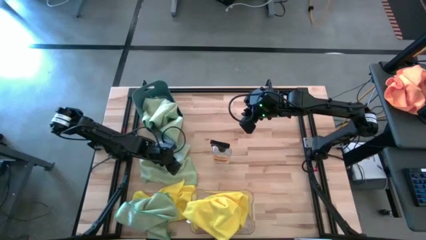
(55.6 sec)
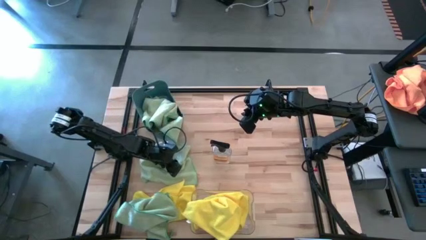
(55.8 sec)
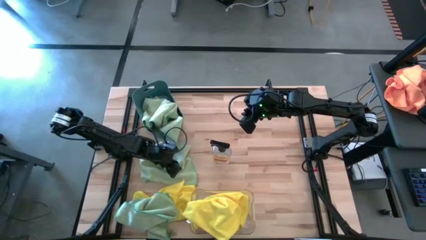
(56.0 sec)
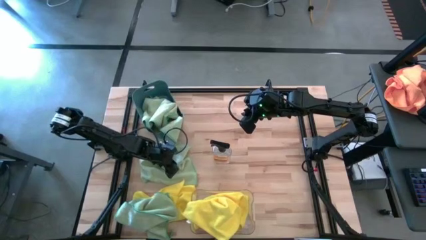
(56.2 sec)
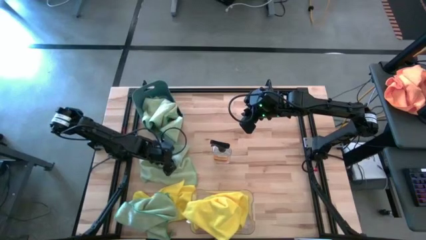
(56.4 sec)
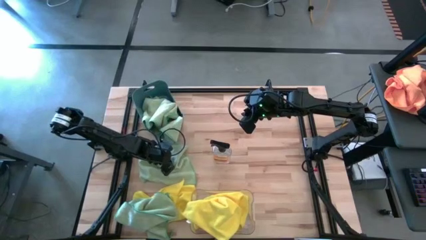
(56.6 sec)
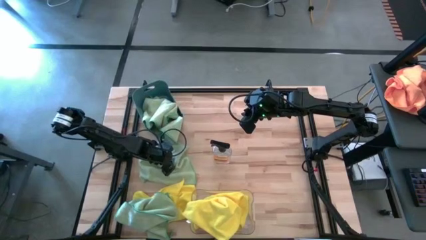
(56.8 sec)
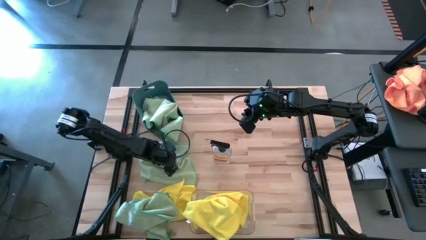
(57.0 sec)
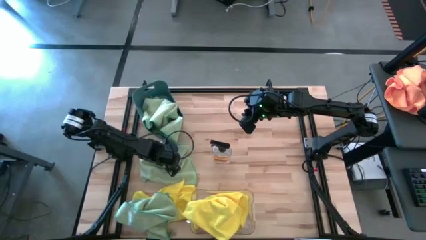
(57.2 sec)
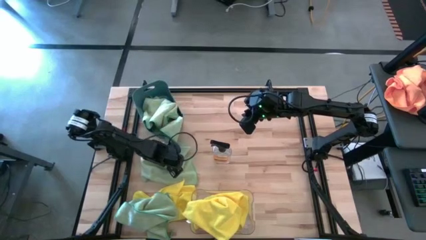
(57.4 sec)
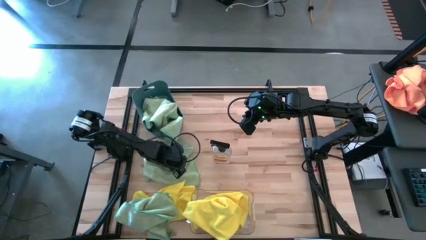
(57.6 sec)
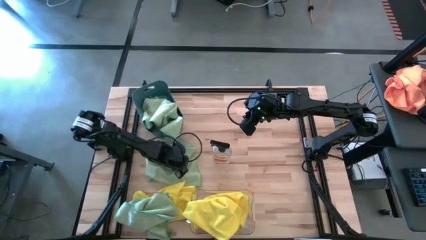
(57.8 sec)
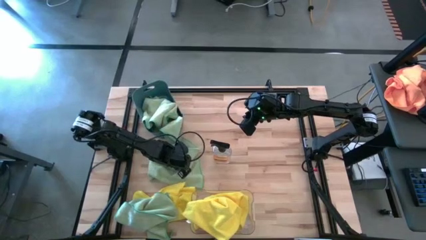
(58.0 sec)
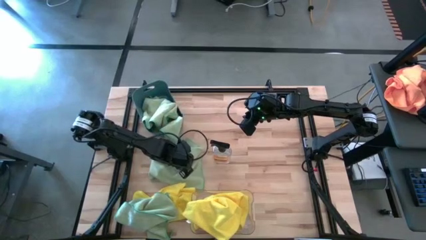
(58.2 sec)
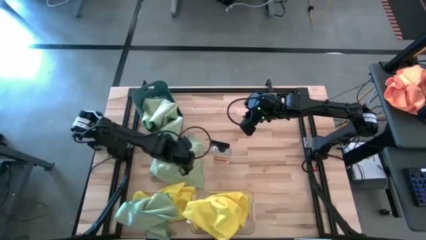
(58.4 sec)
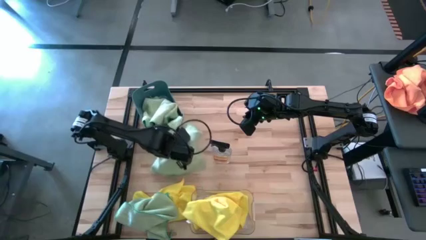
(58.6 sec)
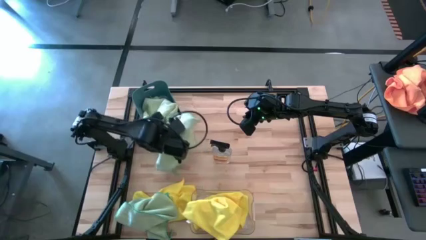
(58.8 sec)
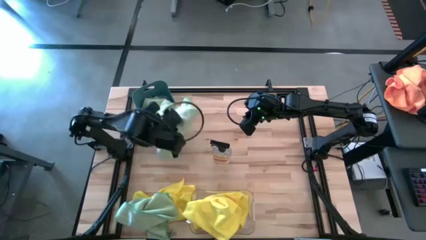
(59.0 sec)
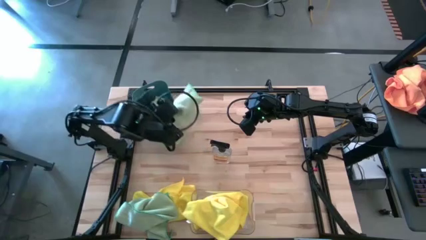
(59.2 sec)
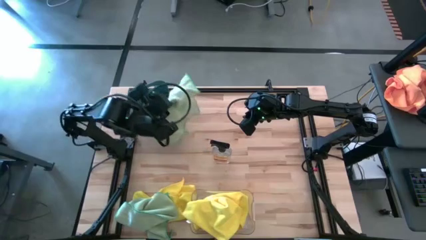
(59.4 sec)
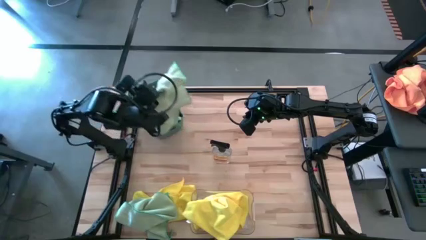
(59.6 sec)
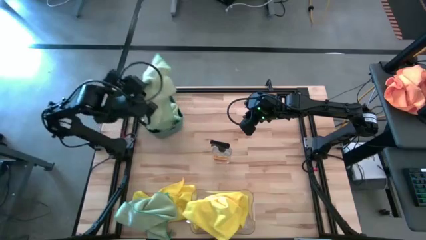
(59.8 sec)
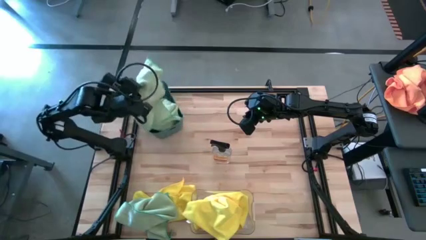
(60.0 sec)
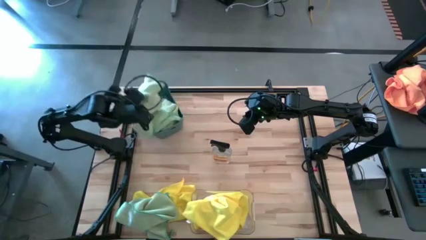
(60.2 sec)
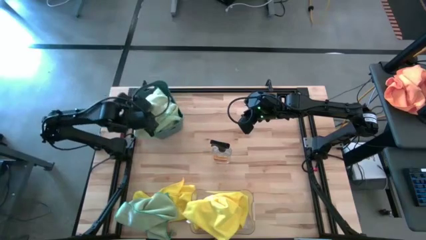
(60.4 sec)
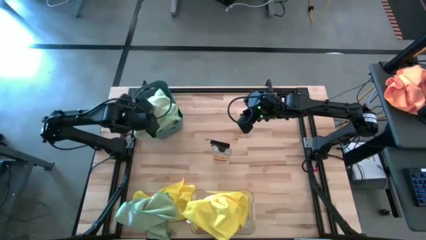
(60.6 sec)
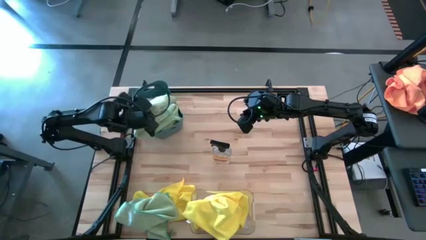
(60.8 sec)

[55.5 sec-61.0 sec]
Task: Sort microfiber towel by color & place in baskets
Put the green towel into the green bin

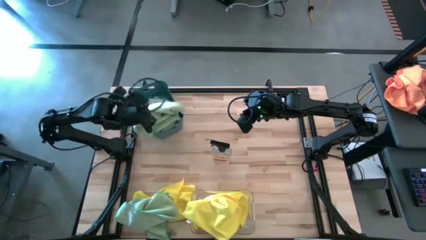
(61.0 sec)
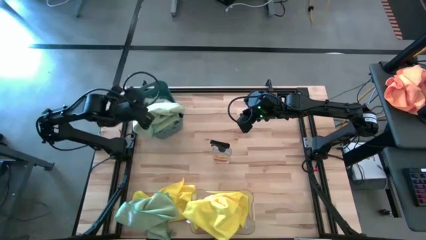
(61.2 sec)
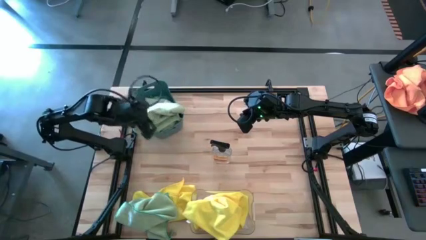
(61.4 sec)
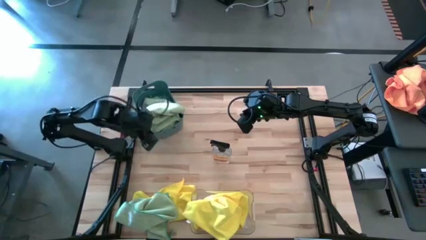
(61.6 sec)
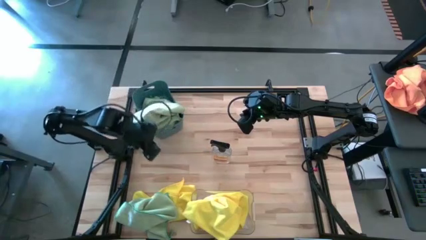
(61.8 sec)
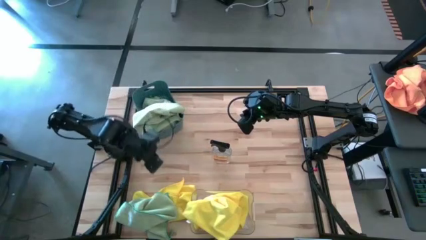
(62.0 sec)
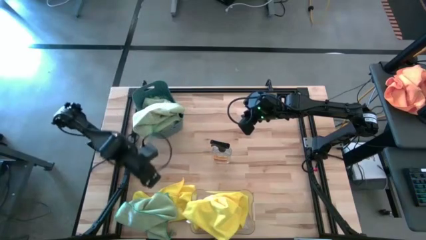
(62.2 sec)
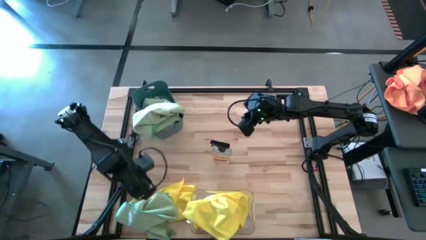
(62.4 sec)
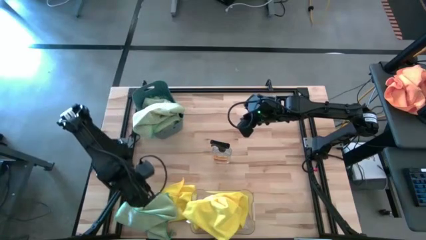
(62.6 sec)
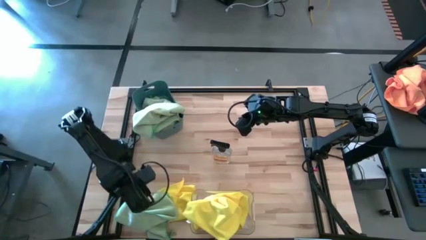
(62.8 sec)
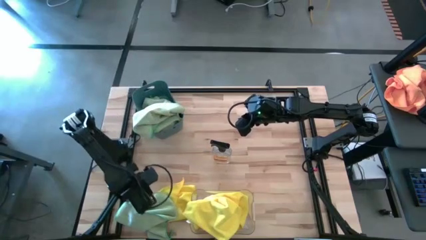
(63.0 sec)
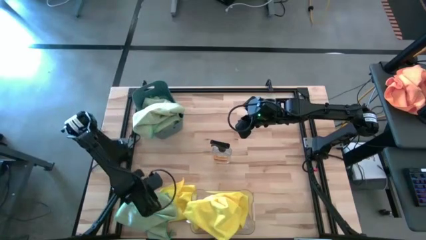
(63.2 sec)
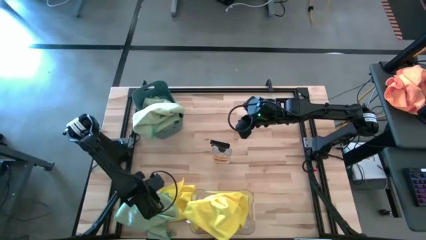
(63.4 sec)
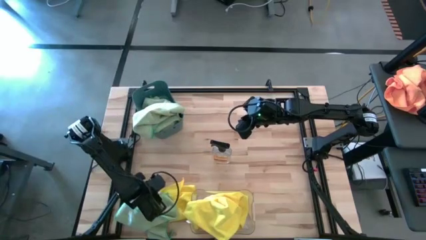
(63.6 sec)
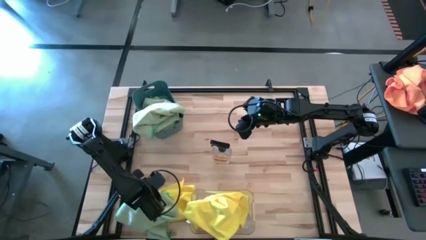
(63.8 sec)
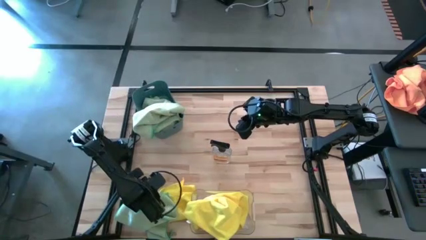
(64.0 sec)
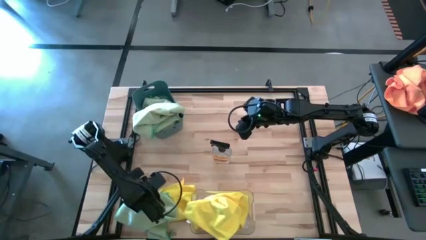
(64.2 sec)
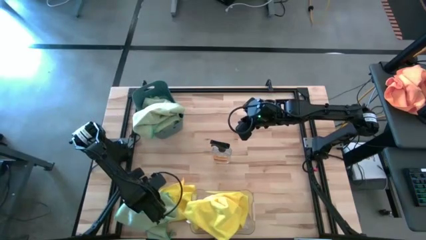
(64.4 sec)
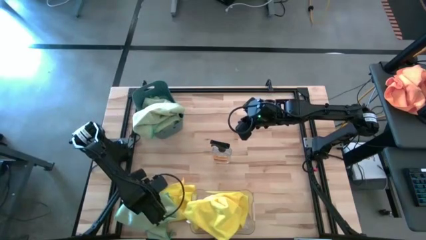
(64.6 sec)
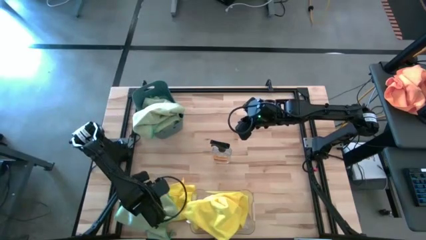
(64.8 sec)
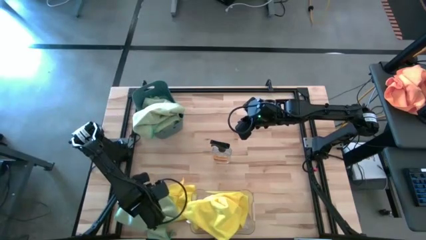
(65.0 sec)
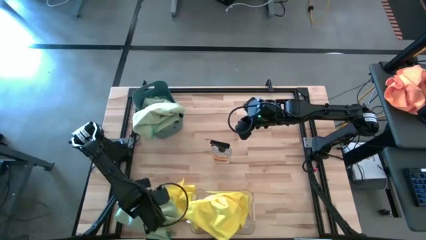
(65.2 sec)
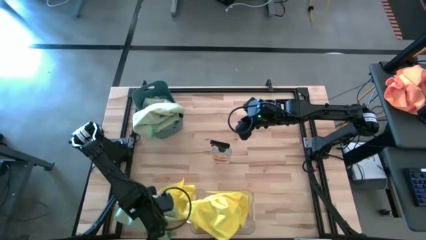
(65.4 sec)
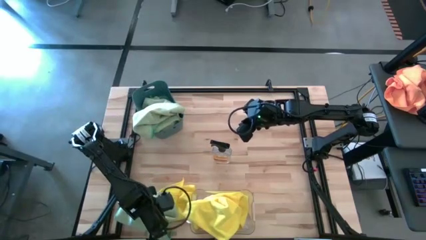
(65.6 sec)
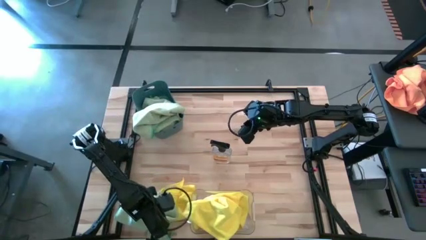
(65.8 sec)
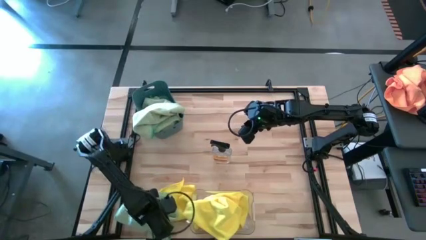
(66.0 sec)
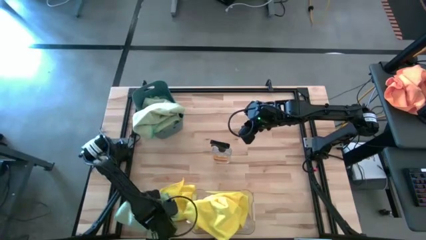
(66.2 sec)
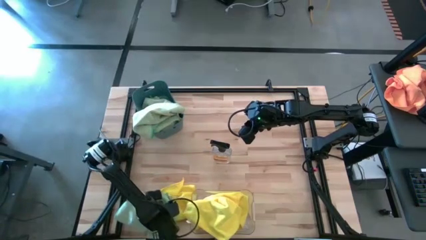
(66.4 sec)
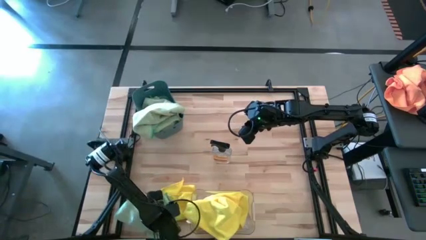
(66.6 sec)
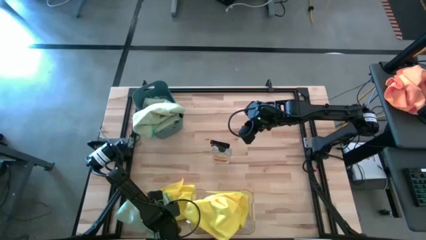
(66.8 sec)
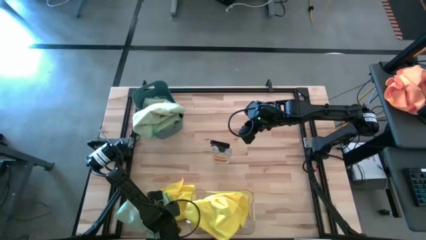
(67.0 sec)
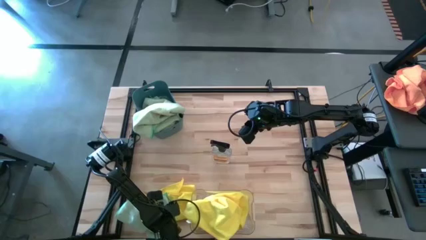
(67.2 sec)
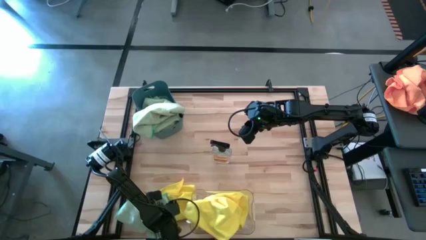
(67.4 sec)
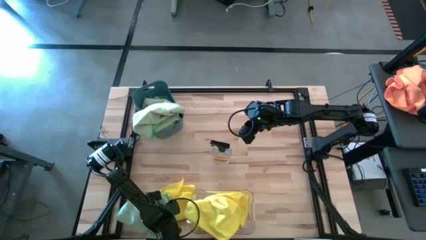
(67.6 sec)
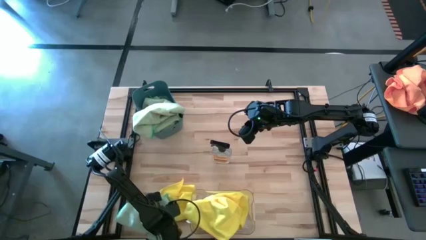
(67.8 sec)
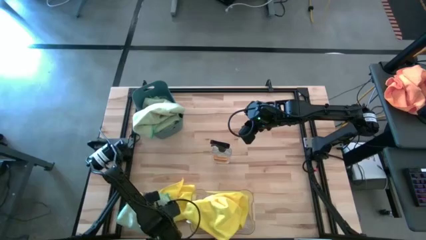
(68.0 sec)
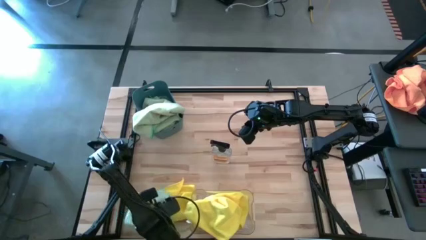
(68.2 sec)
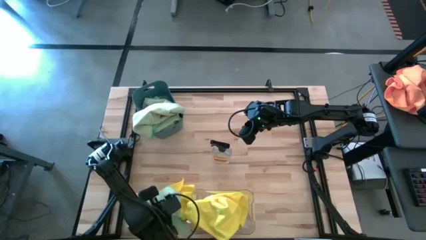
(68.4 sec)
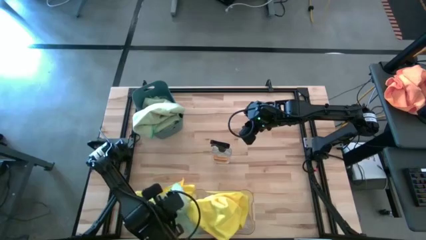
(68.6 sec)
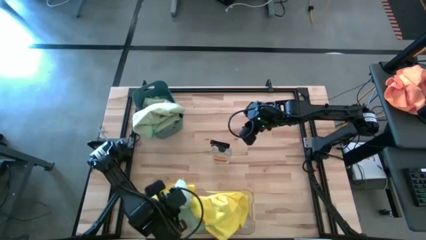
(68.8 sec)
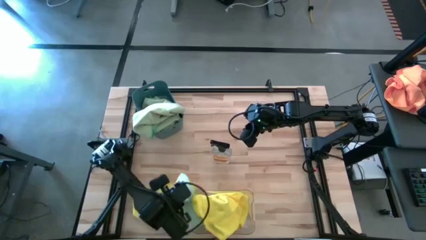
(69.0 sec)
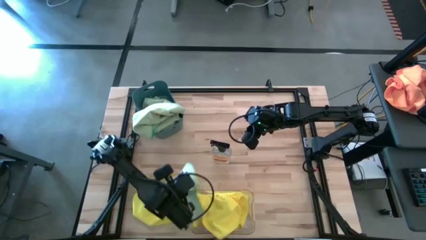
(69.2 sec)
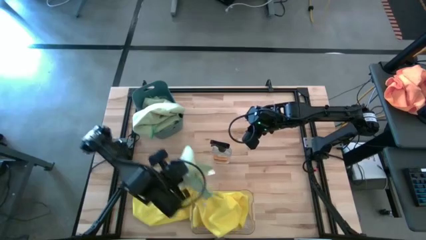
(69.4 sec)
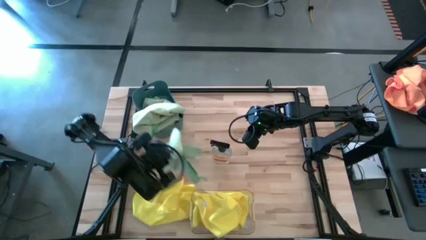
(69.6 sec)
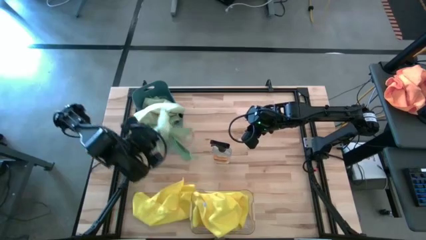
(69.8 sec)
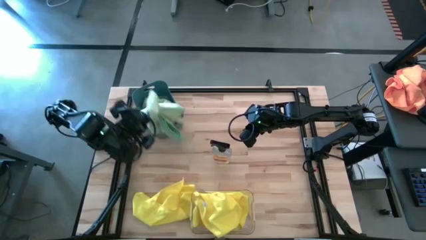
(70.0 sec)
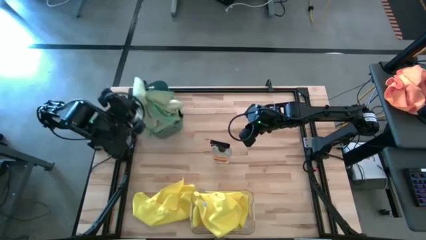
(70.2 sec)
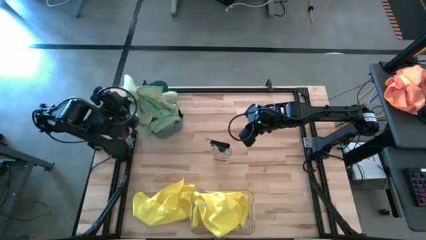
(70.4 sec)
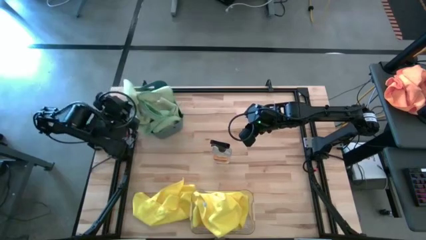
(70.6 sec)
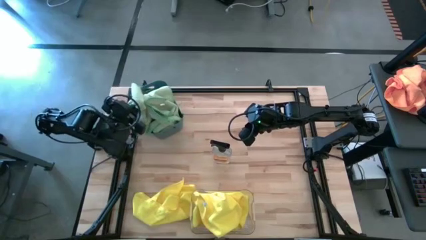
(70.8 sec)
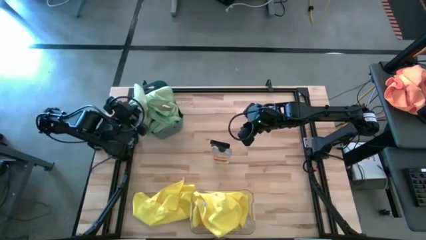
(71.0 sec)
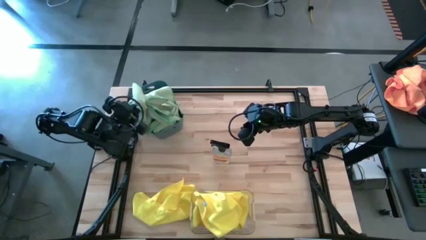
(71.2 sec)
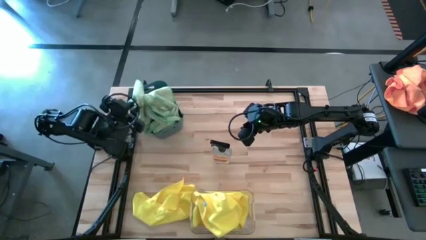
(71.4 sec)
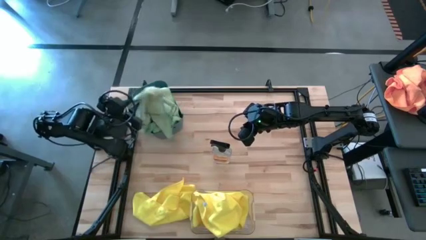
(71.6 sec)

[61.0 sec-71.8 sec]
Put the green towel into the green bin
